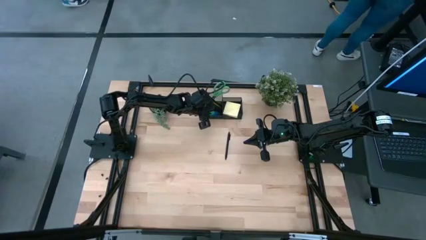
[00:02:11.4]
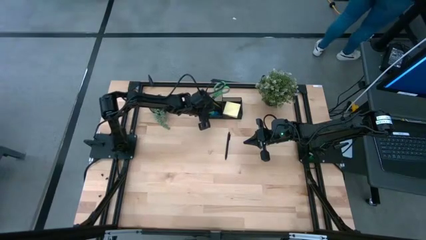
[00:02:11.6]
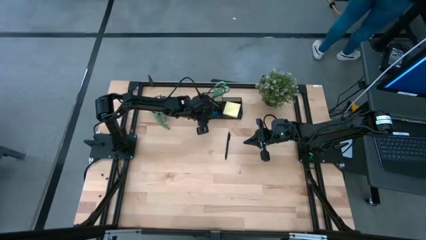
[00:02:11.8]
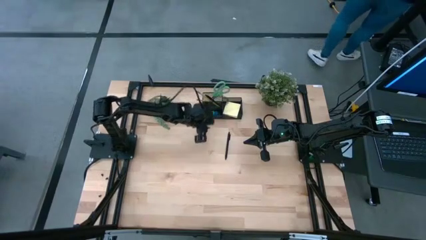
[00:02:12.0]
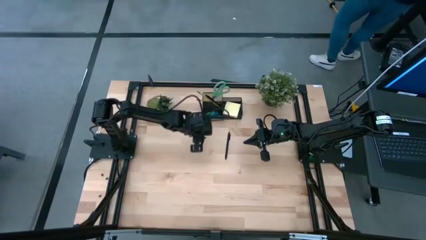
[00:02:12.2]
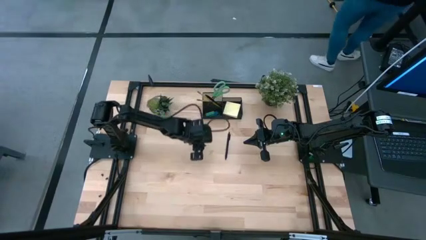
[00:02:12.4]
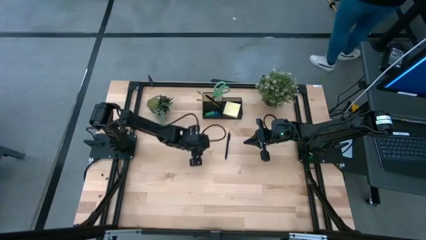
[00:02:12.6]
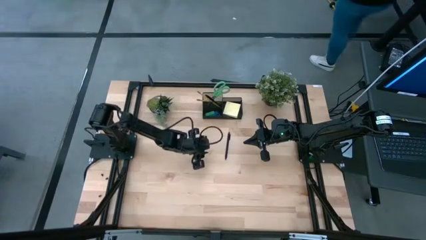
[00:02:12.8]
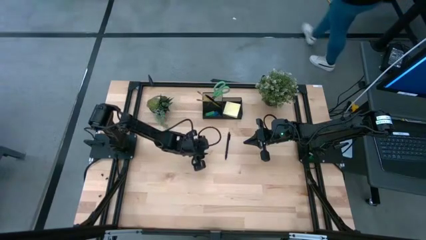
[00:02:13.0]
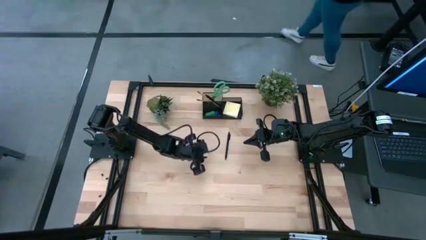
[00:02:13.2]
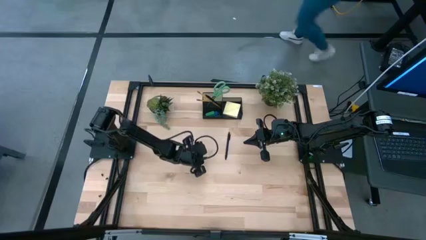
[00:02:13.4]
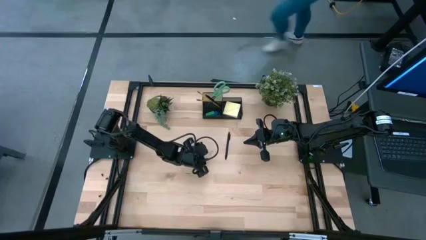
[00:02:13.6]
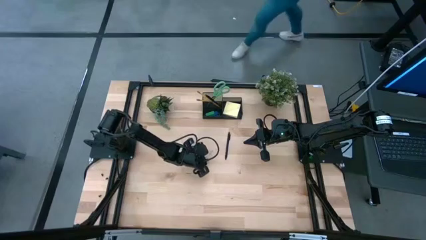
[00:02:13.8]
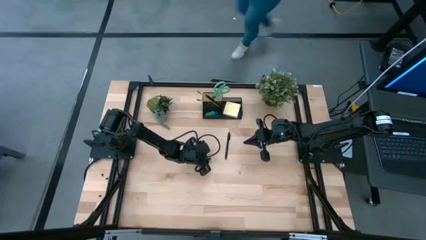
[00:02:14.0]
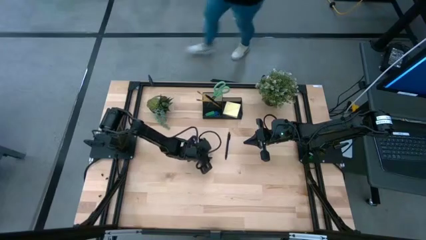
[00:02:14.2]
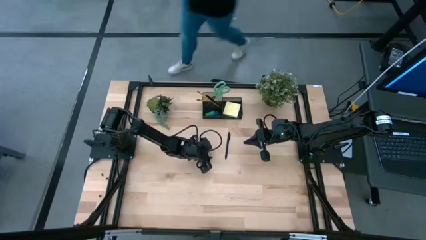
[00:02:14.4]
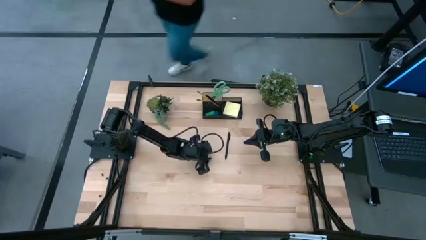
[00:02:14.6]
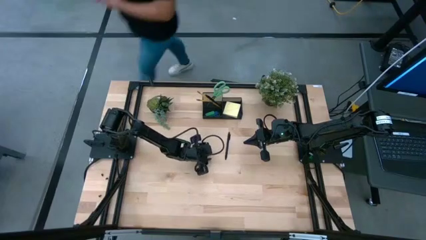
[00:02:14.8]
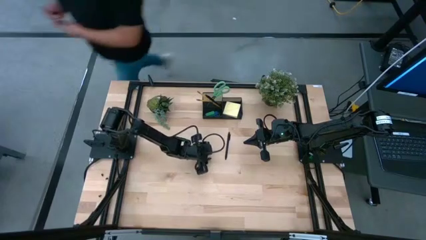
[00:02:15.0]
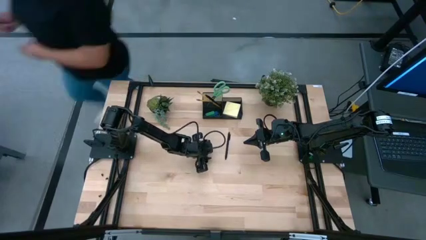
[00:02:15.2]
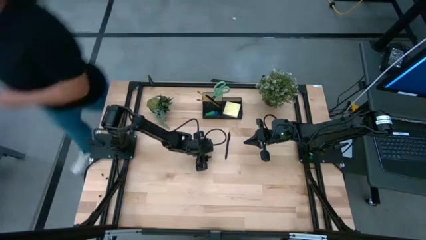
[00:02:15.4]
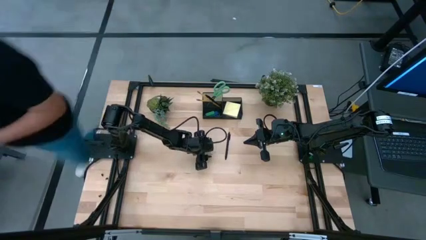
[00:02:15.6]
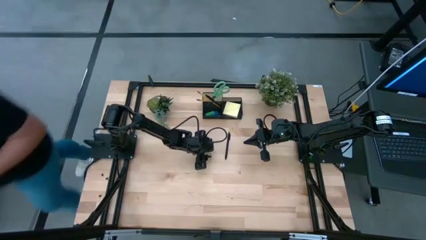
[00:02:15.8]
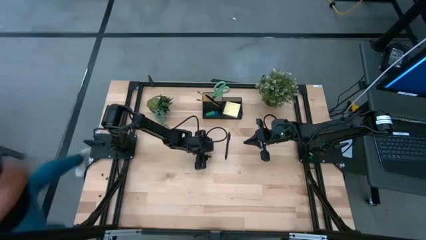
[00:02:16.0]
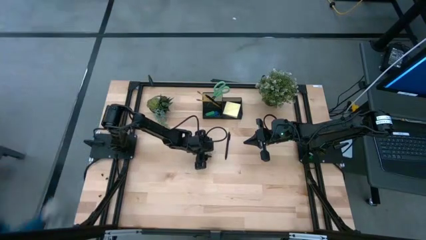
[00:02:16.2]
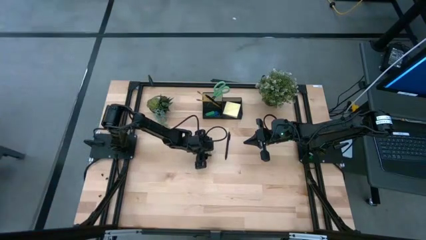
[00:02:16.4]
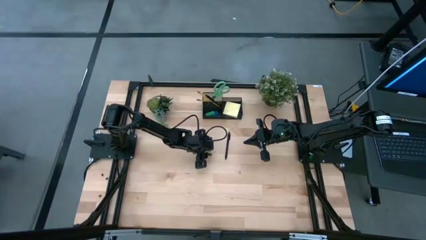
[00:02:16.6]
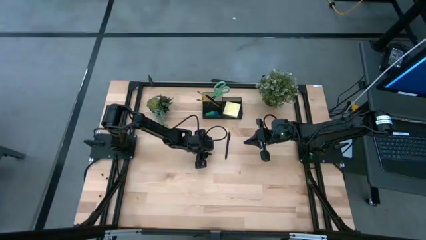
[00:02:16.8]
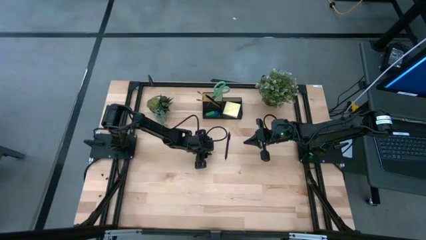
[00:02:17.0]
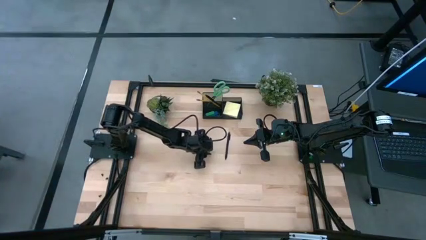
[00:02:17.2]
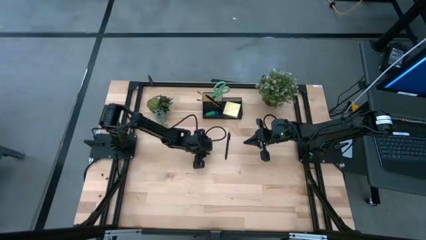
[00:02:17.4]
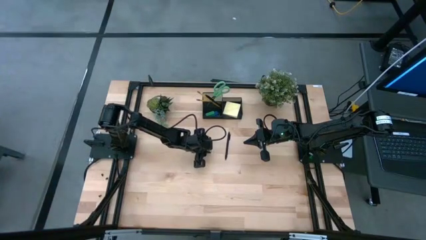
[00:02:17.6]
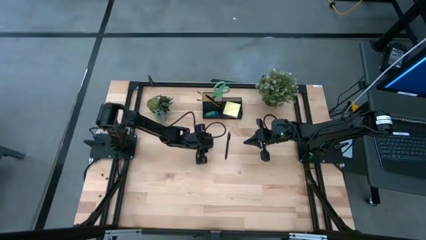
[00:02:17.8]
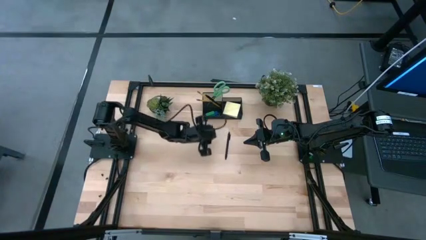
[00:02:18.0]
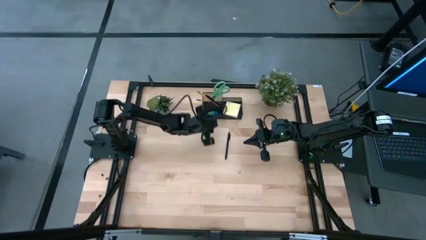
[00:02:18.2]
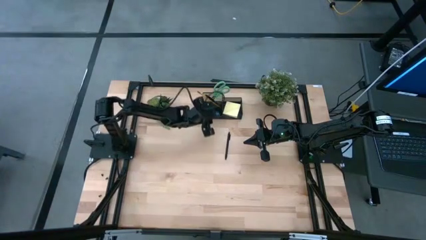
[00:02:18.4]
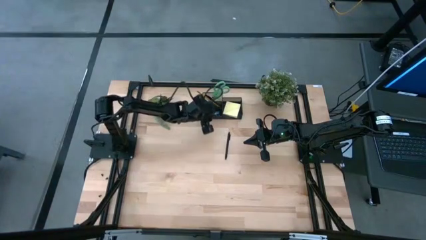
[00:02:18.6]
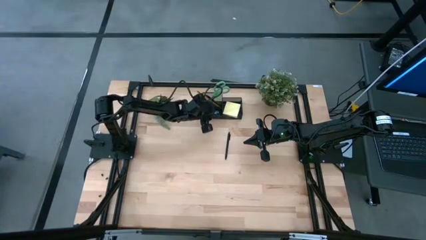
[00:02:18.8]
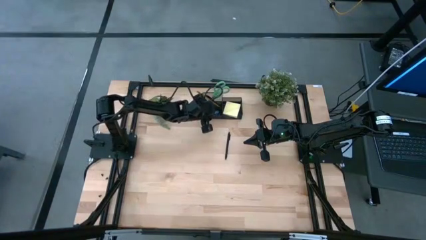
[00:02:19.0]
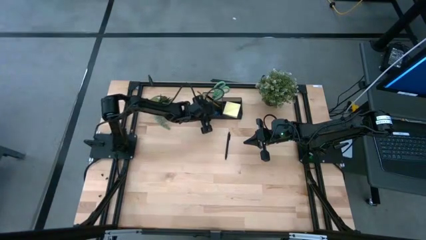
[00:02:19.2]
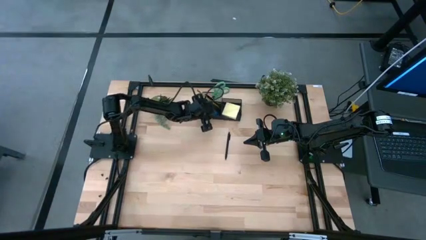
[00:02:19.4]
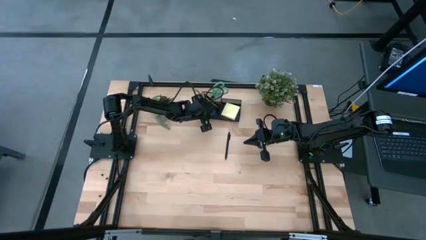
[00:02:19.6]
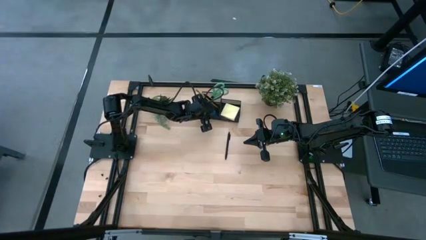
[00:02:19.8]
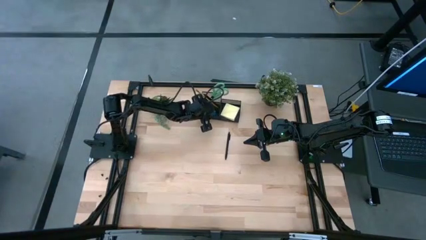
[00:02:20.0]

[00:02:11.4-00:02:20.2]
Task: Pick and place office supplies into organizer
Put the binding clip into the black desk organizer

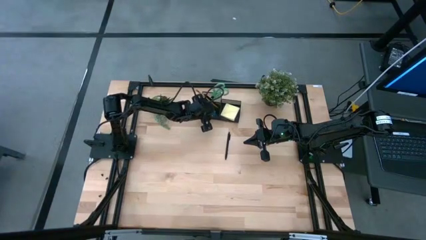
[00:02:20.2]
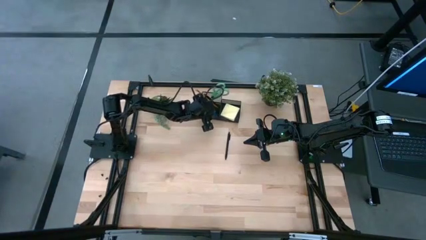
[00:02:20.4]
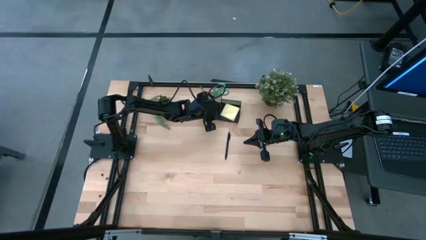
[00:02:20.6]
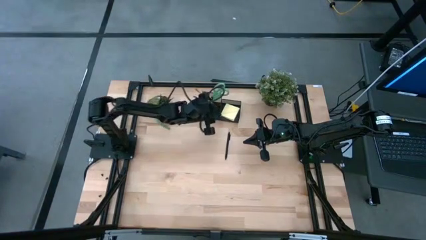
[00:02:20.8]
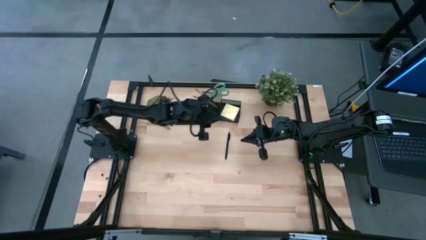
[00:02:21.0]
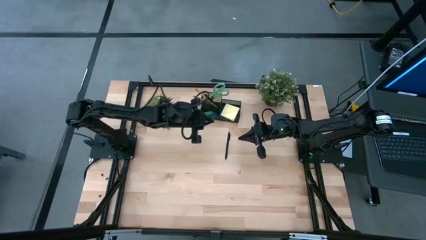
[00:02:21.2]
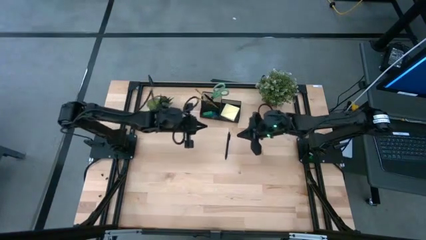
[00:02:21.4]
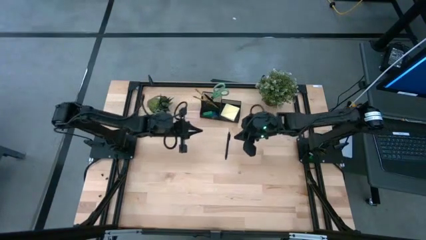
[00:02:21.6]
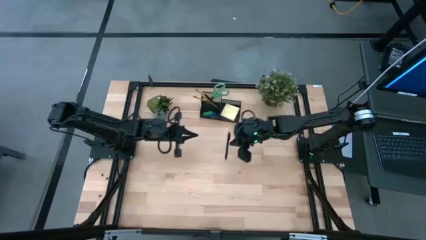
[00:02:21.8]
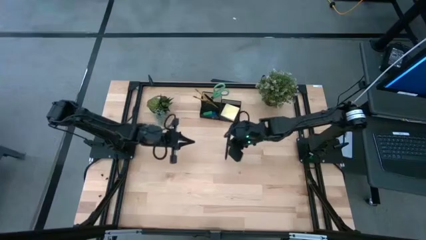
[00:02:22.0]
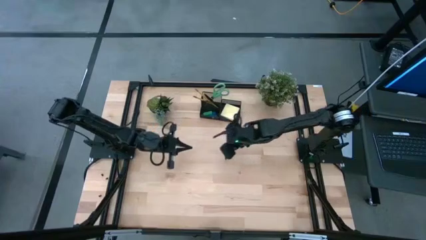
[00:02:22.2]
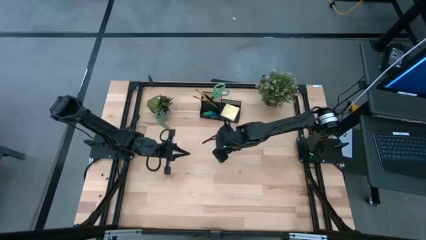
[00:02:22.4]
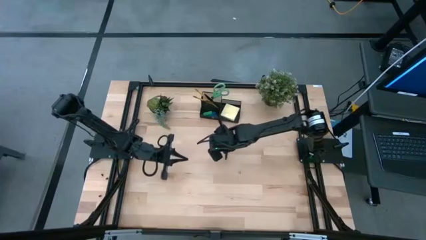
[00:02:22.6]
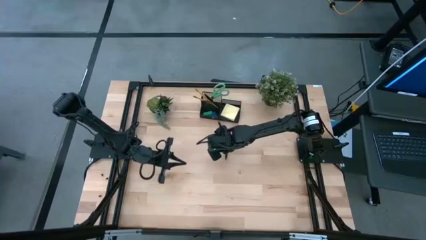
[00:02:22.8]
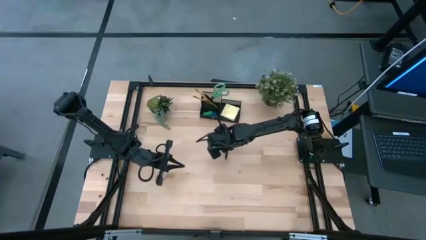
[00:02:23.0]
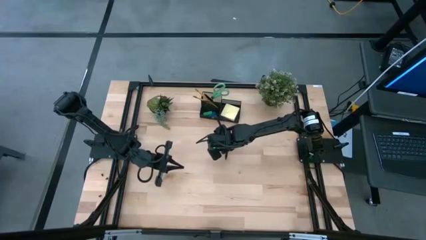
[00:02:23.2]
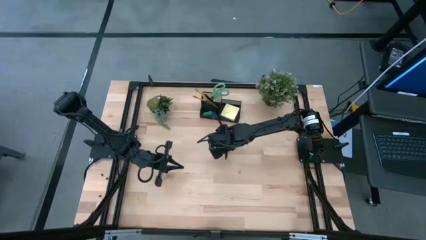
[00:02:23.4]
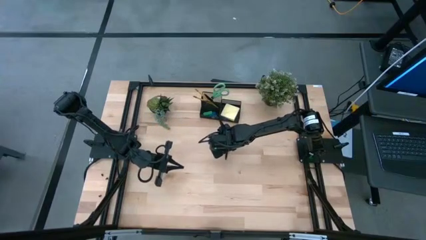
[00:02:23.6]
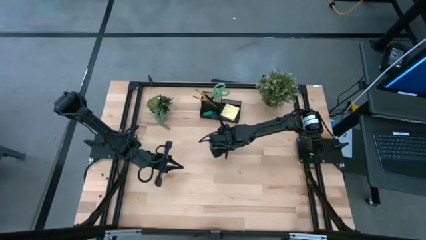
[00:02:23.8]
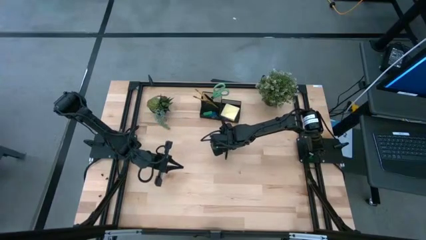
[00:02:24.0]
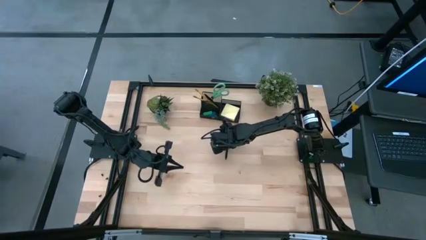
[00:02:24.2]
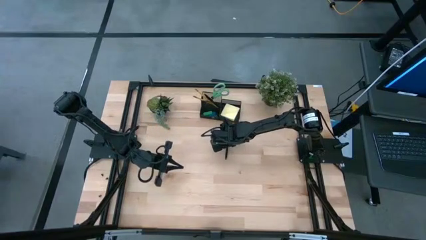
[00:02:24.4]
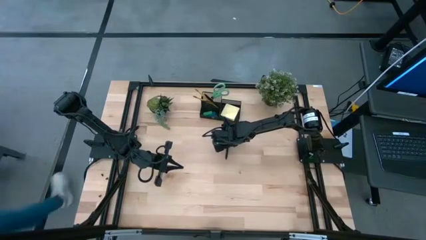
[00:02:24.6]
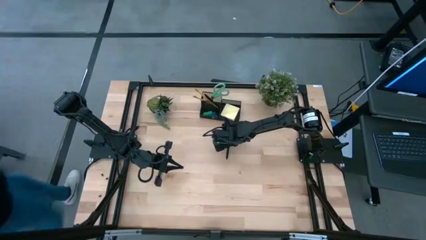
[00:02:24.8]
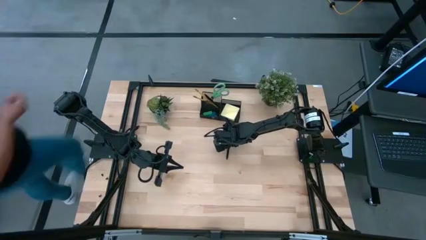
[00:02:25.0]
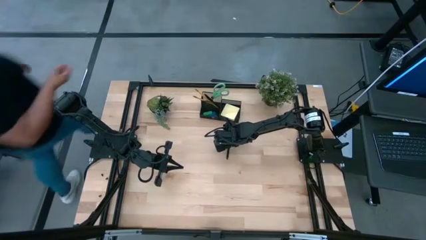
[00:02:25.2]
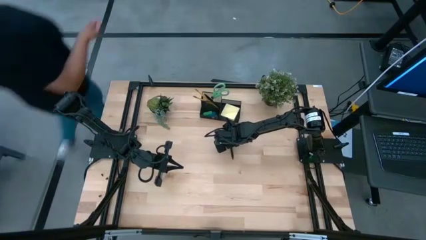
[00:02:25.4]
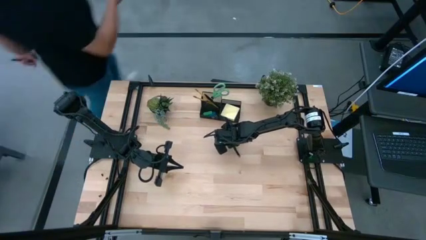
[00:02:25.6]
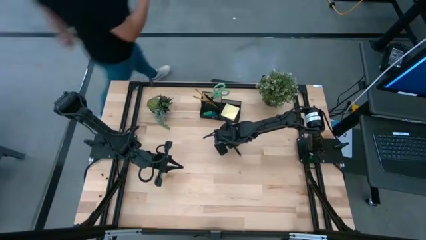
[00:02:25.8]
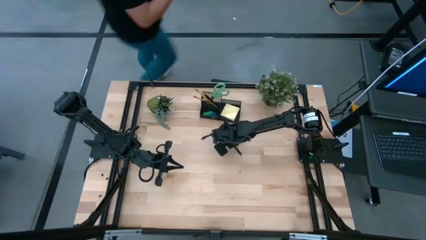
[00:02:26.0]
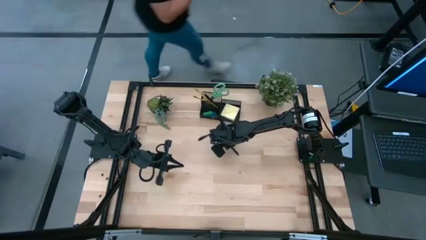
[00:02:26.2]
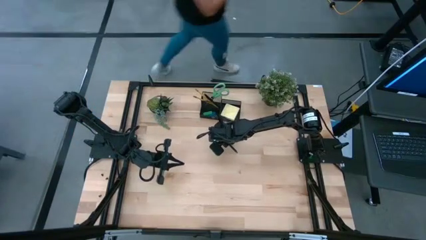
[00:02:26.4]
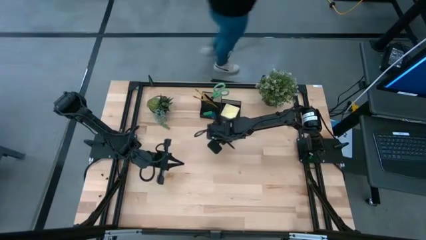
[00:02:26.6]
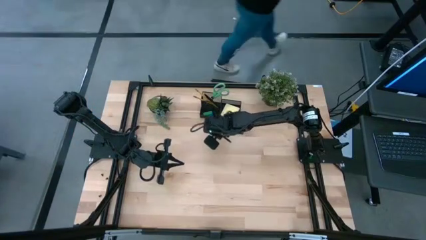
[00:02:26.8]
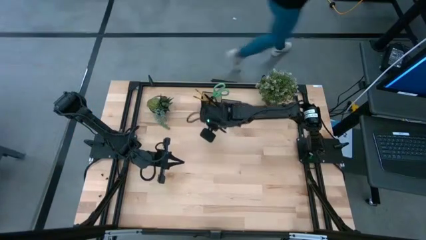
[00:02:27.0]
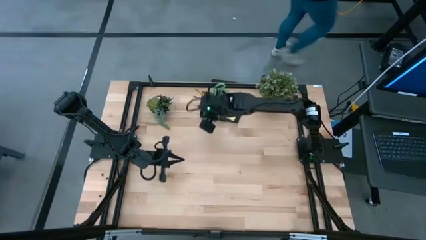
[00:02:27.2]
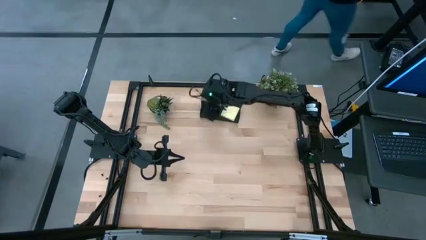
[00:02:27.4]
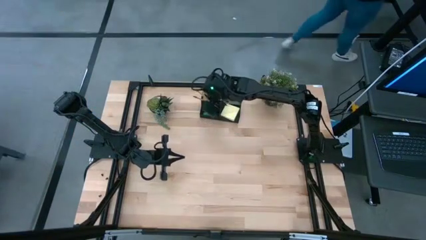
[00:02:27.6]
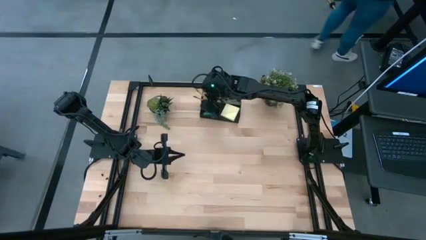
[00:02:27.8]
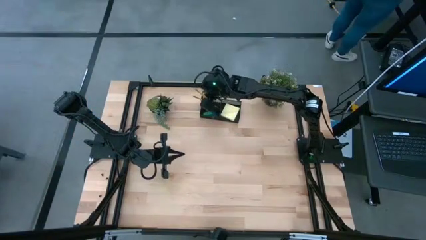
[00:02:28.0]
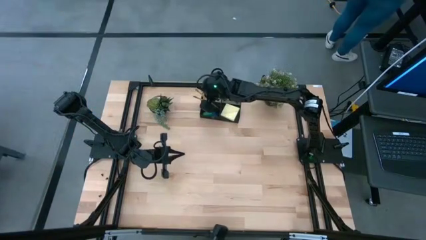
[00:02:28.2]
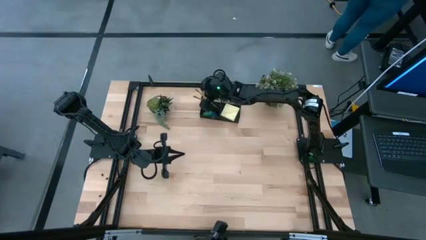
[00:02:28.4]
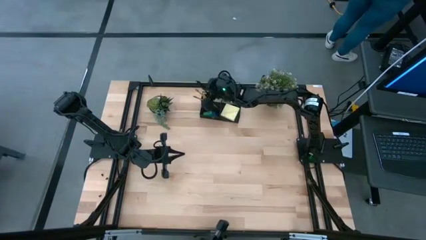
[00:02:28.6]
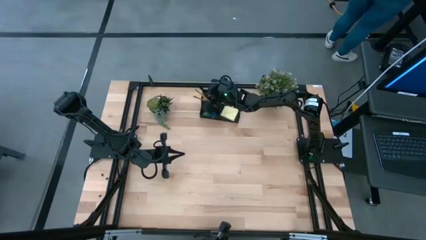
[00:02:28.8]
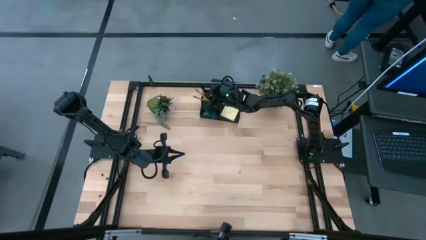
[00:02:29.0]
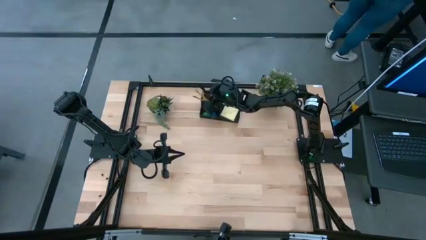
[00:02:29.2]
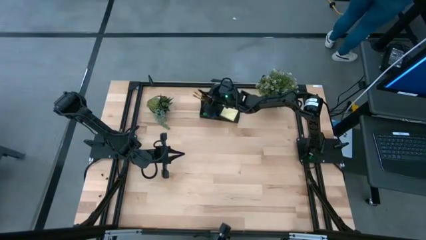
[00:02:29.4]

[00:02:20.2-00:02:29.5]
Put the black pen into the black desk organizer
